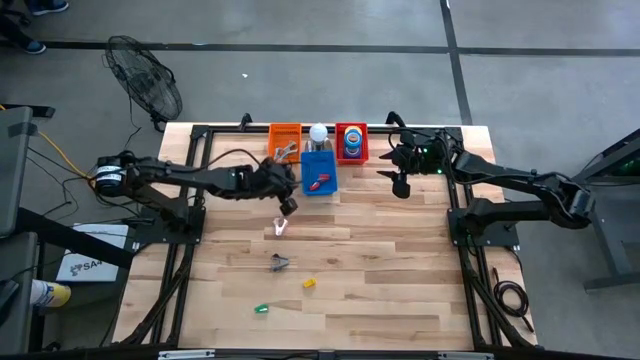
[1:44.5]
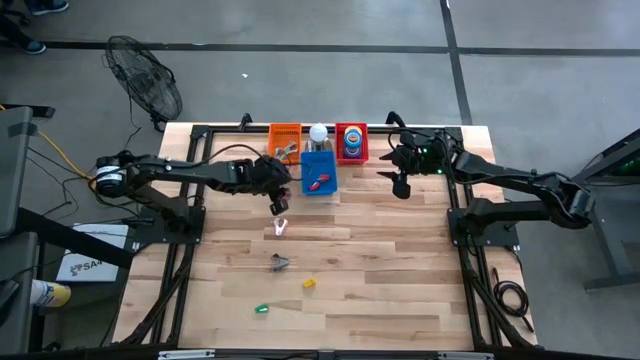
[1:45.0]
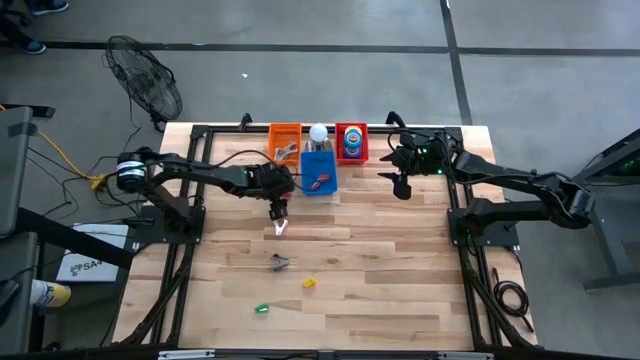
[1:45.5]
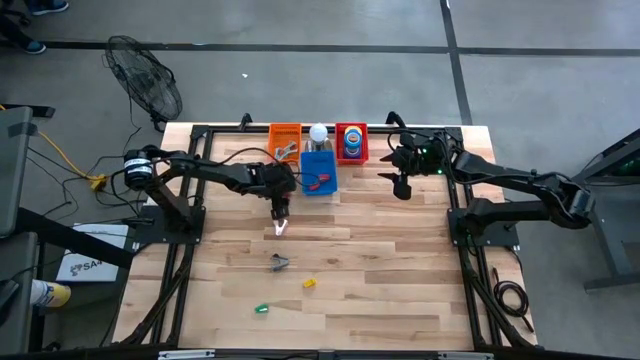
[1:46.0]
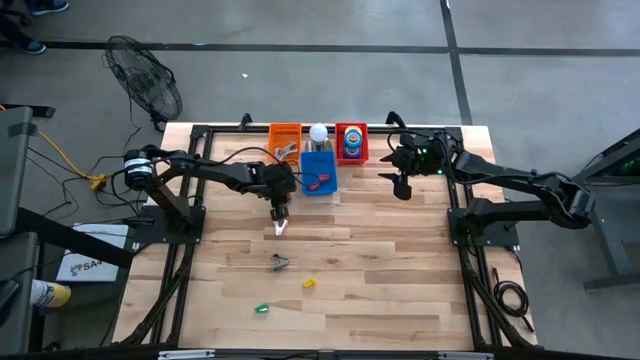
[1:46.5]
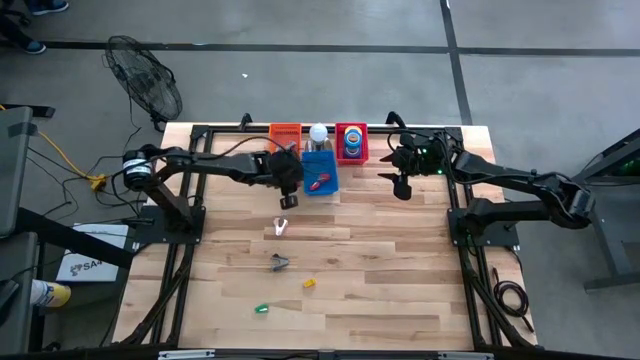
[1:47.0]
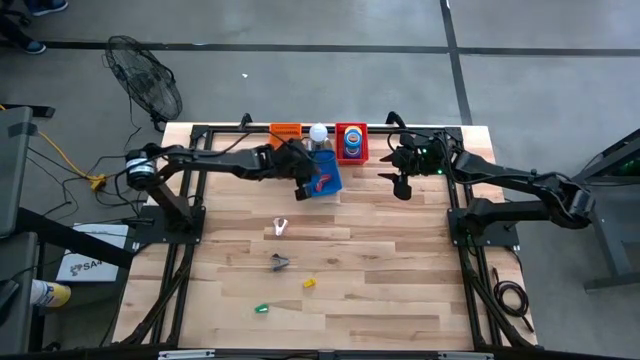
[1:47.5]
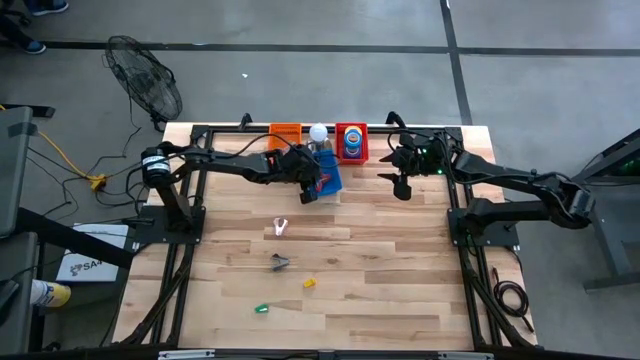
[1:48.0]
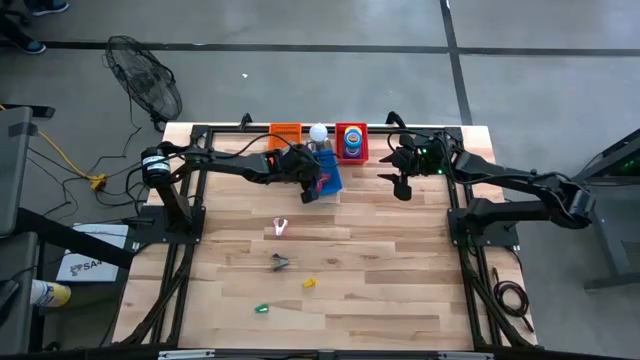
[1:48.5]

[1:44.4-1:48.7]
Task: Pick and place Stapler, Stapler remover, tape
Put the red stapler into the blue basket

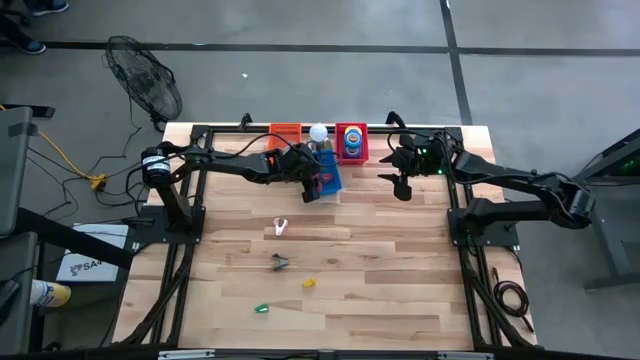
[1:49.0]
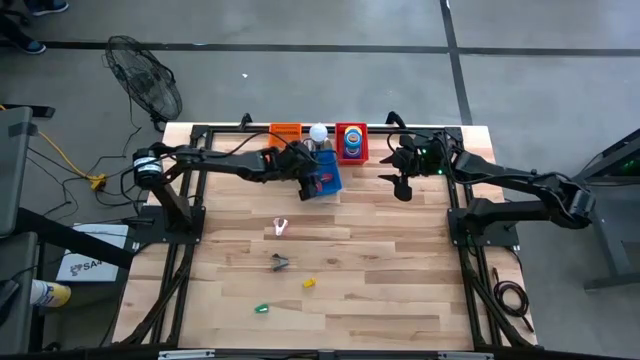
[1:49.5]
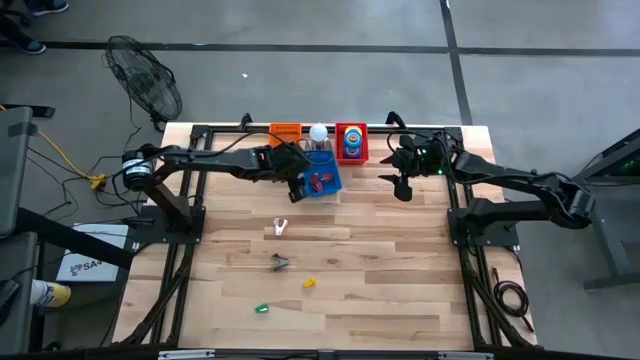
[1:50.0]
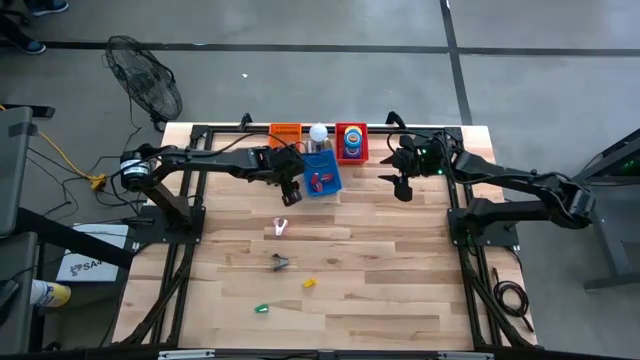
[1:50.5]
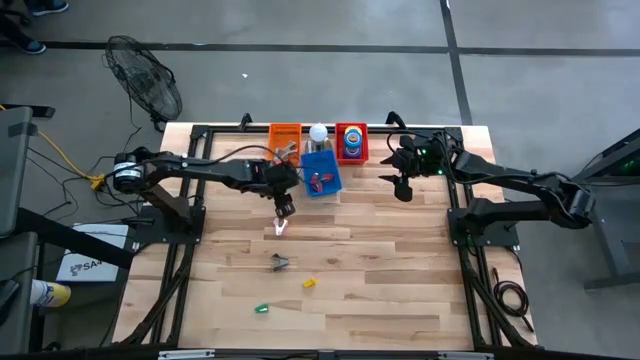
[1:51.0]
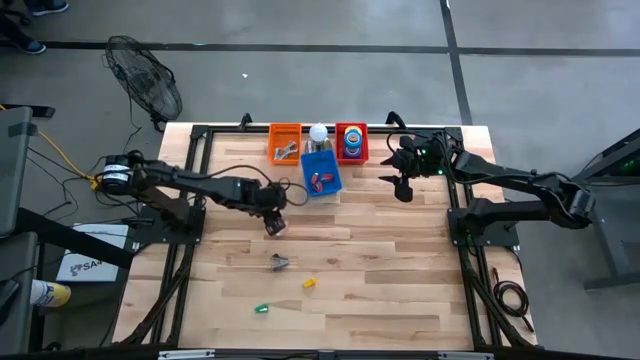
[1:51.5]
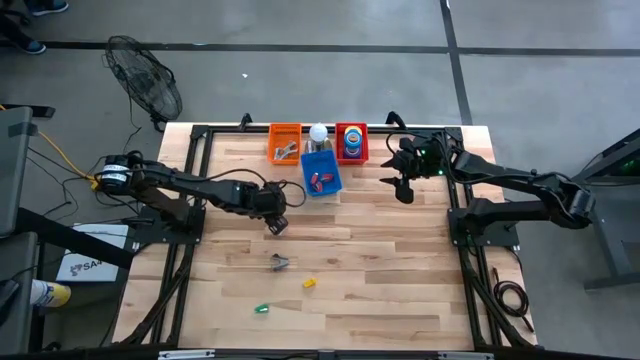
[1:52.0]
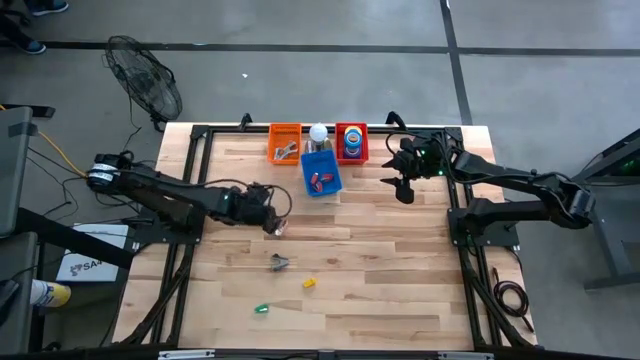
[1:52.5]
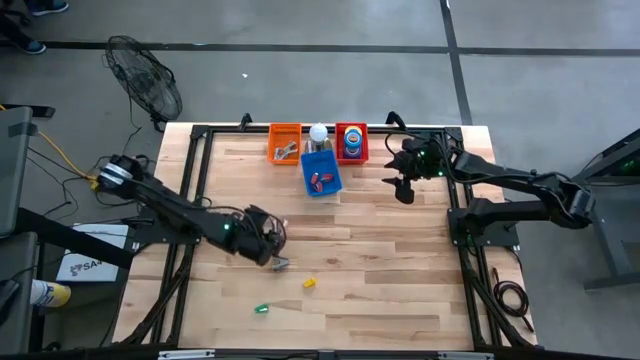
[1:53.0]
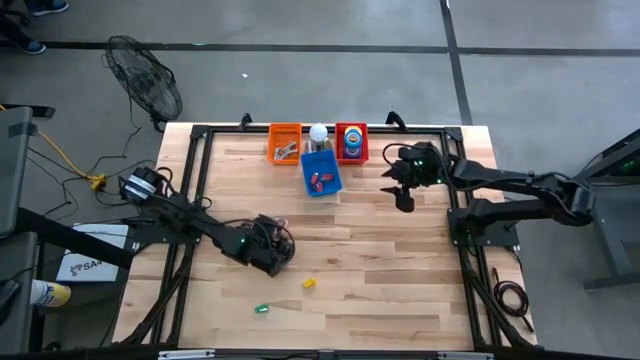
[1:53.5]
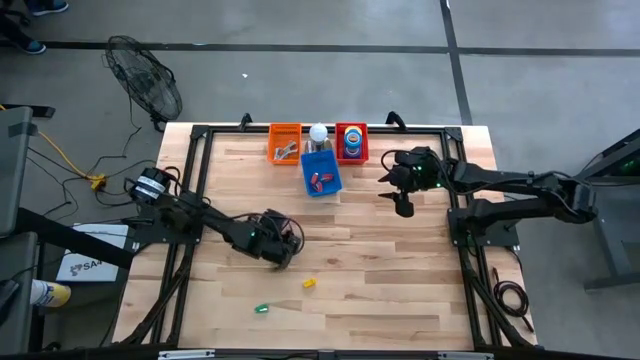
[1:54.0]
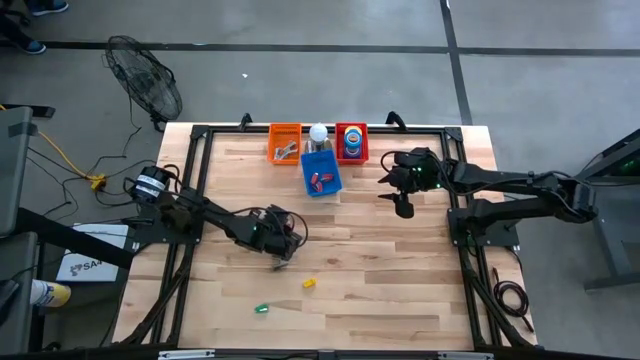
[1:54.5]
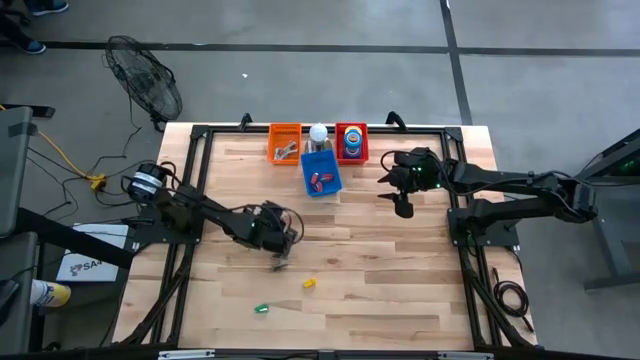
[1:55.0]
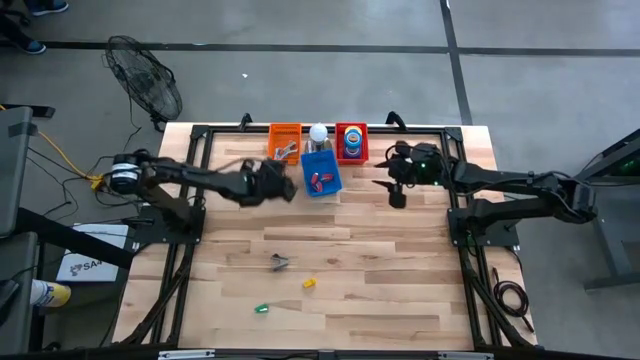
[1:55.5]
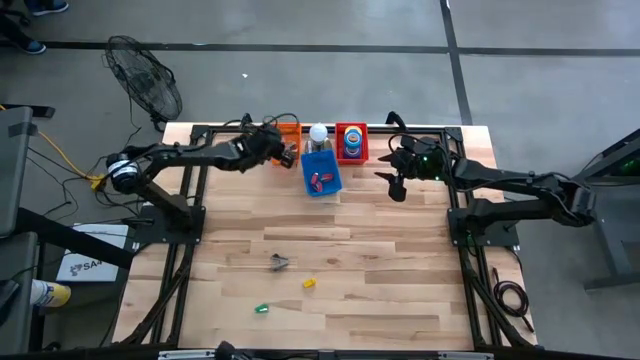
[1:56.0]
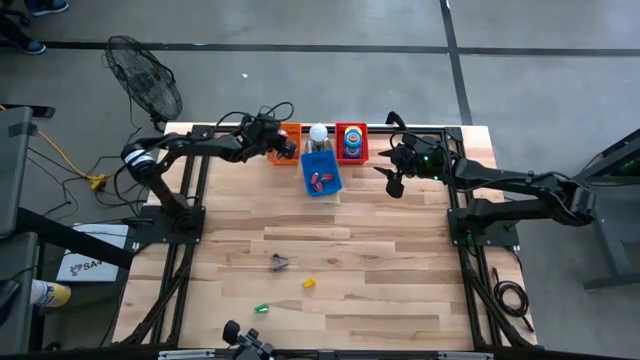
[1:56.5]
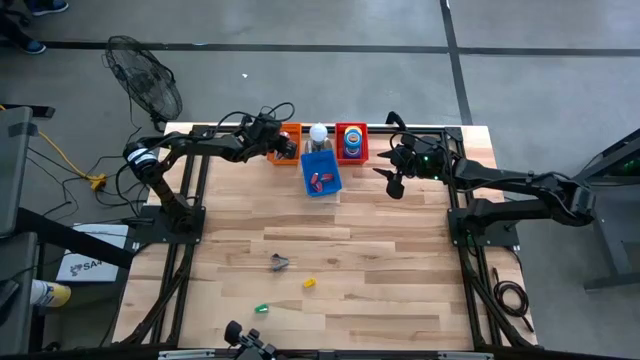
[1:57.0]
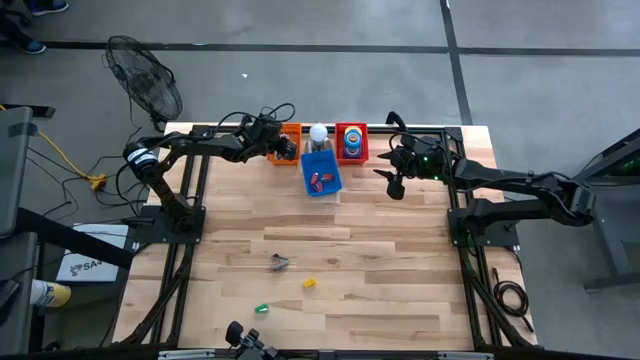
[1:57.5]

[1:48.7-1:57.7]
Put the pink staple remover into the orange basket

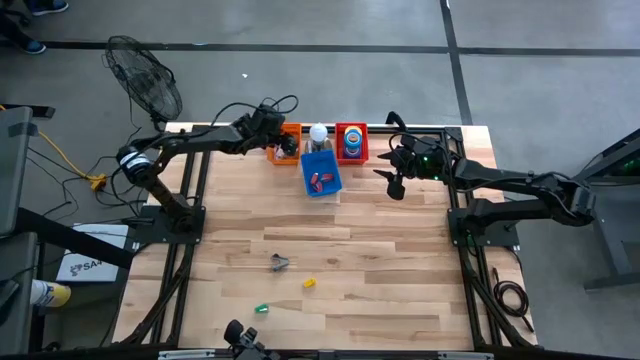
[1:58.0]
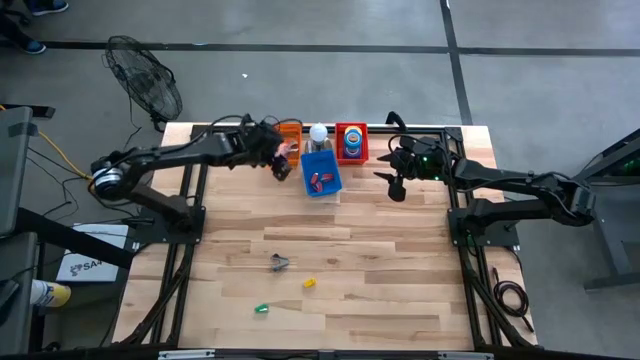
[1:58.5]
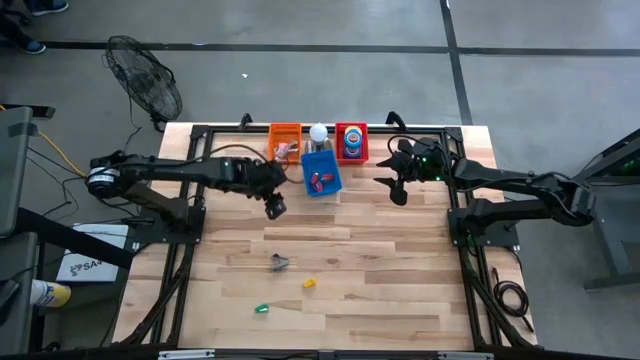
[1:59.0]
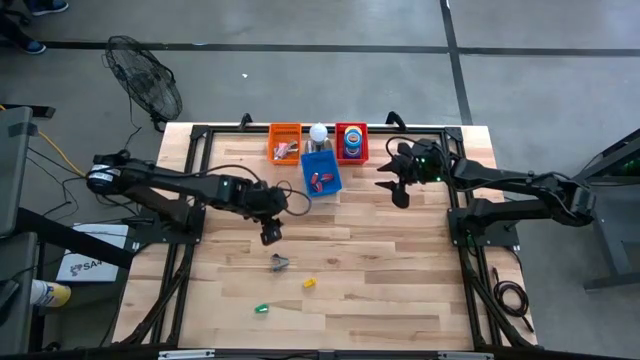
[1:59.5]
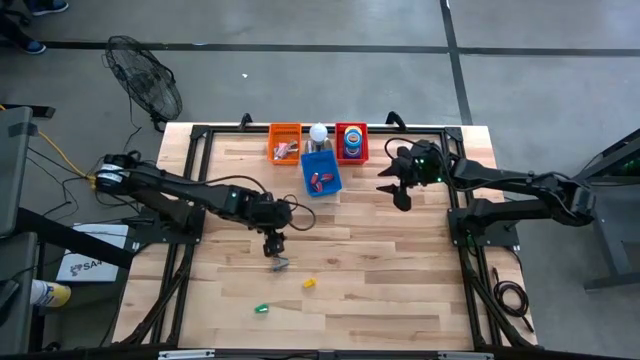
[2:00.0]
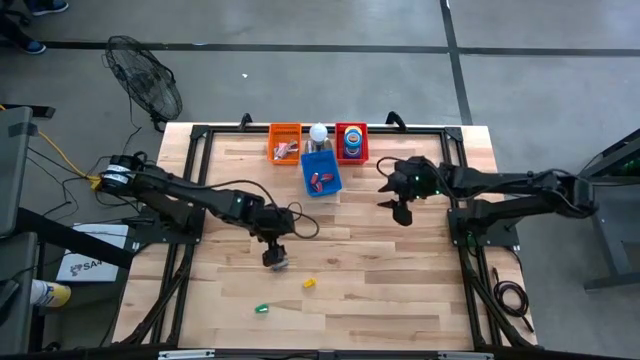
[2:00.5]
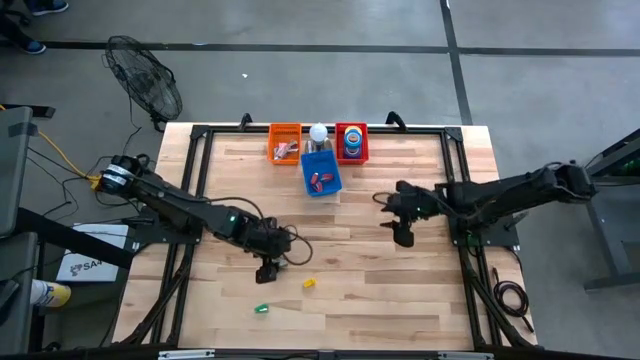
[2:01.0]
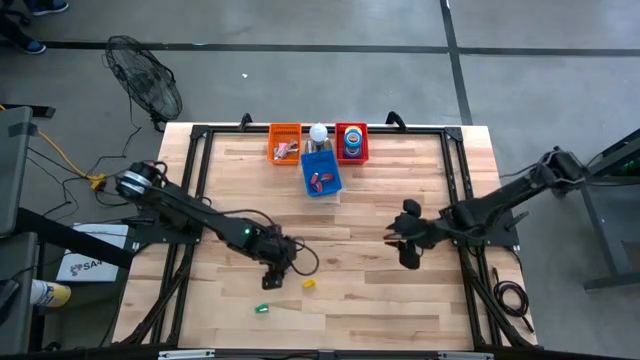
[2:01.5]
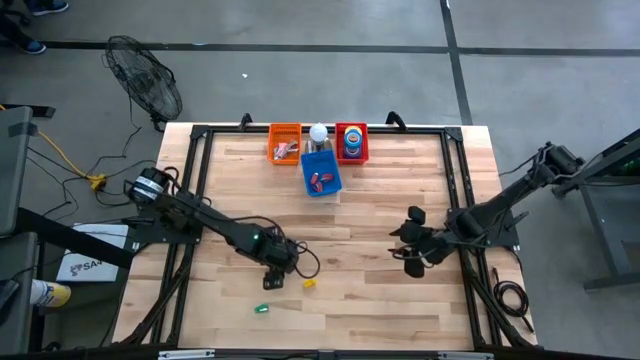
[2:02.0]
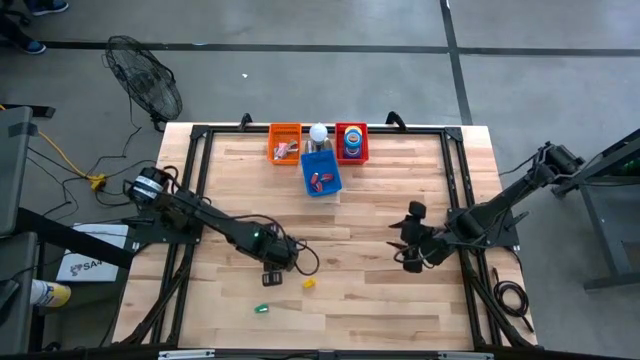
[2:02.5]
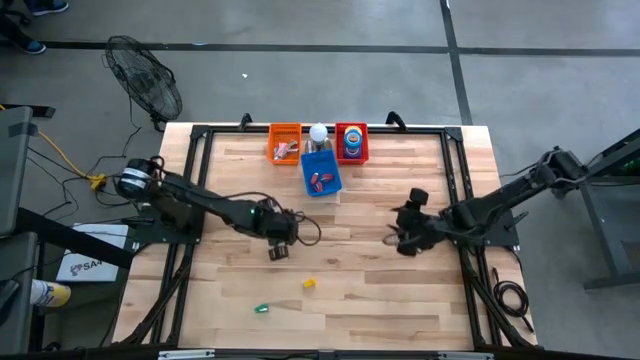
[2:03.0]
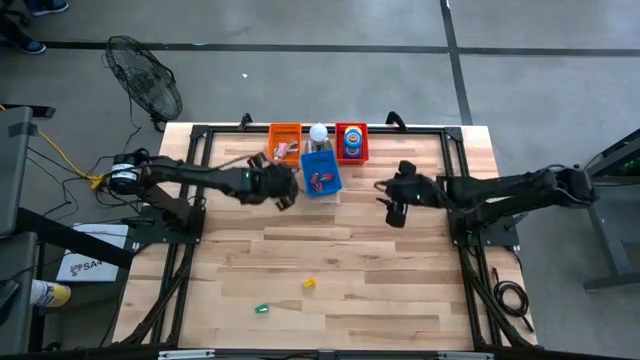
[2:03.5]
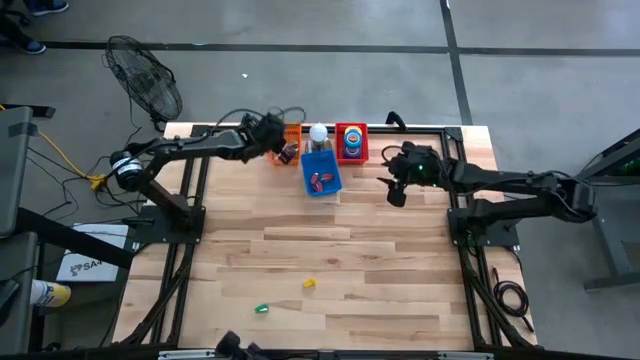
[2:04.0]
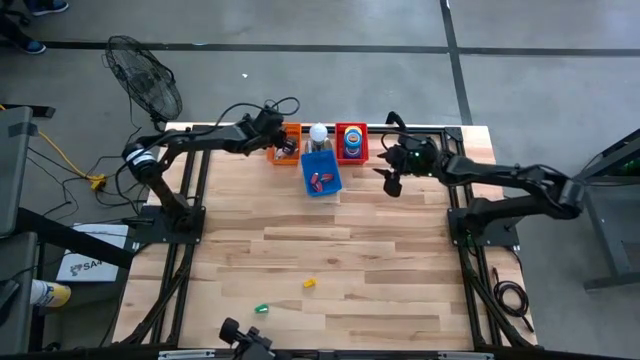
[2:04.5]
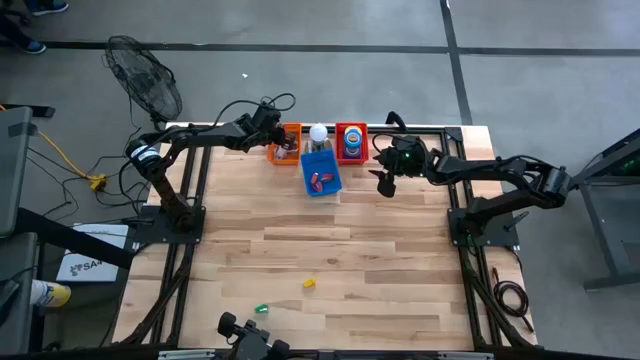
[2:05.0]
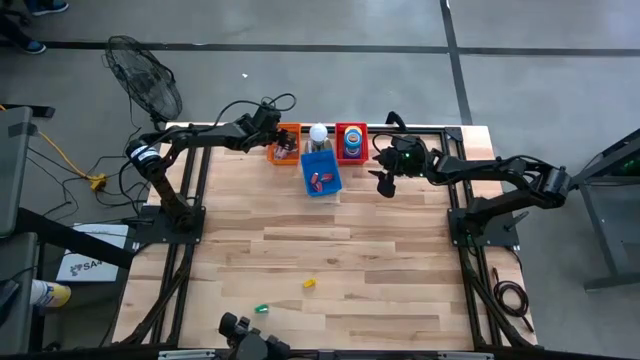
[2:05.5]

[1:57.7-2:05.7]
Put the black staple remover into the orange basket
